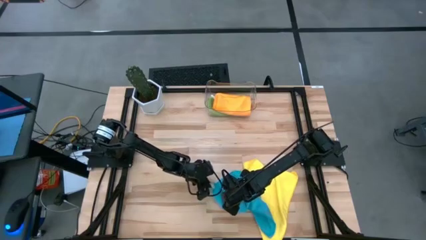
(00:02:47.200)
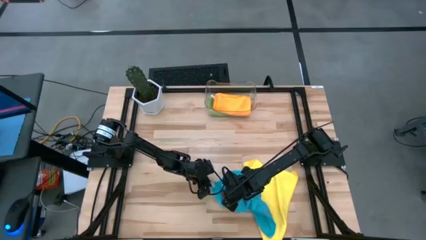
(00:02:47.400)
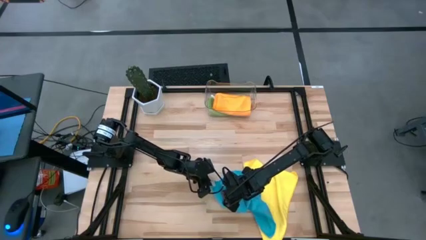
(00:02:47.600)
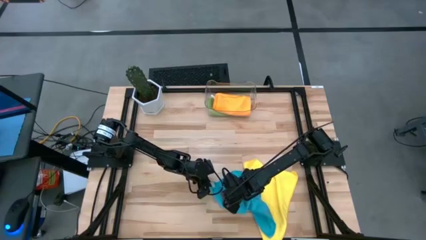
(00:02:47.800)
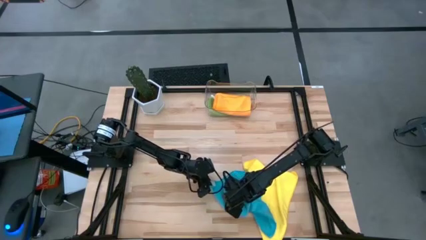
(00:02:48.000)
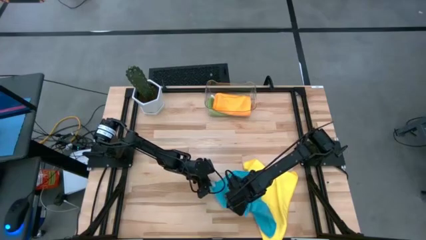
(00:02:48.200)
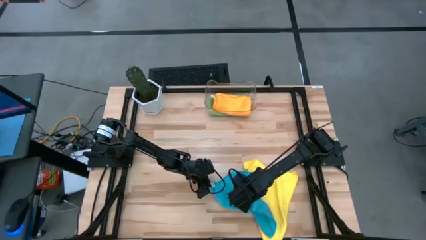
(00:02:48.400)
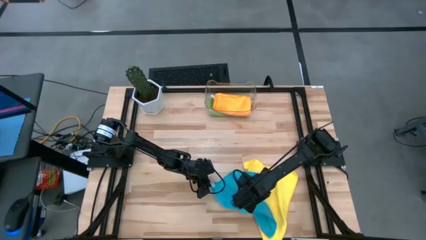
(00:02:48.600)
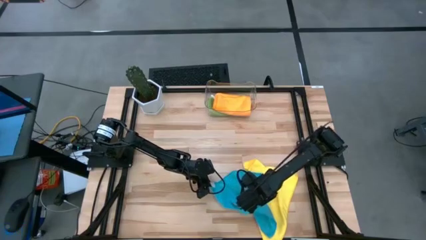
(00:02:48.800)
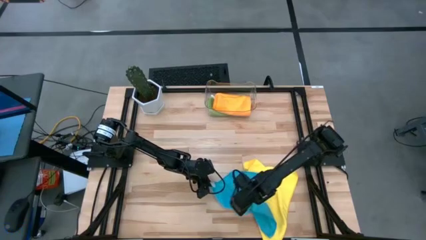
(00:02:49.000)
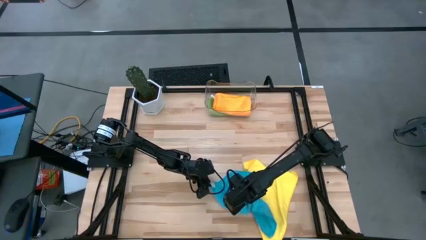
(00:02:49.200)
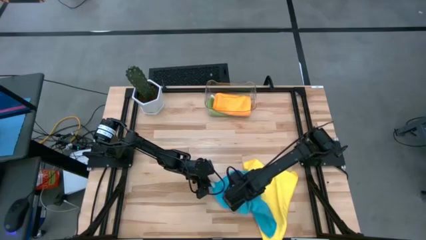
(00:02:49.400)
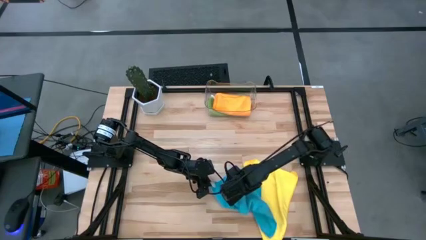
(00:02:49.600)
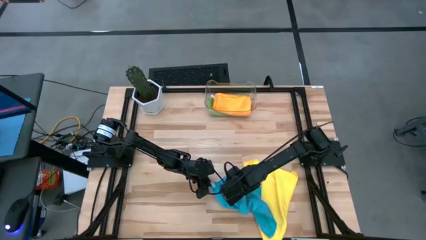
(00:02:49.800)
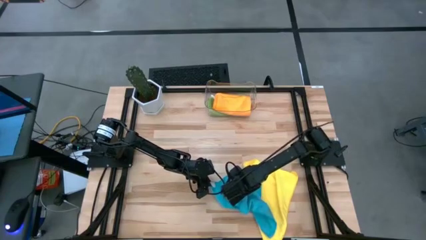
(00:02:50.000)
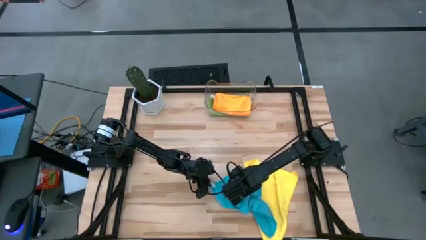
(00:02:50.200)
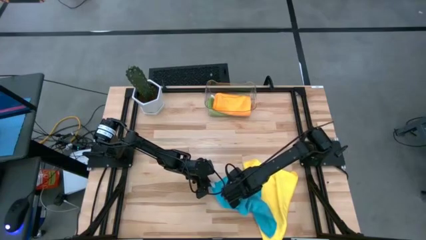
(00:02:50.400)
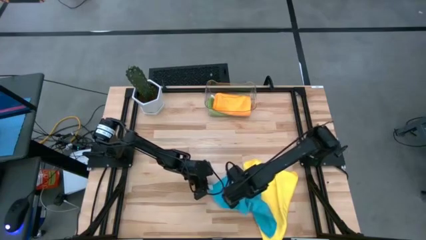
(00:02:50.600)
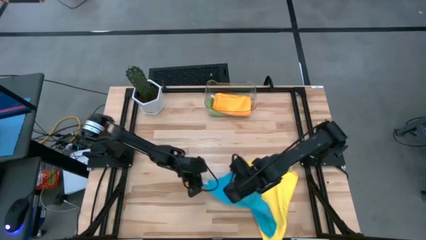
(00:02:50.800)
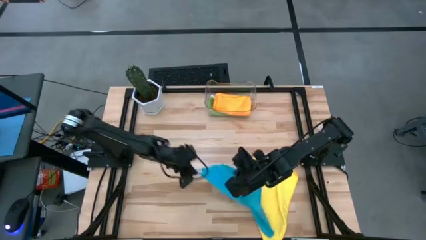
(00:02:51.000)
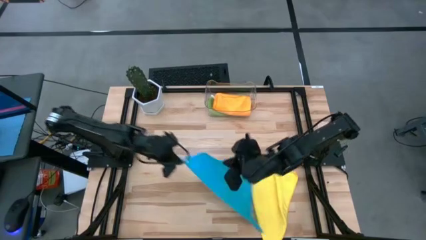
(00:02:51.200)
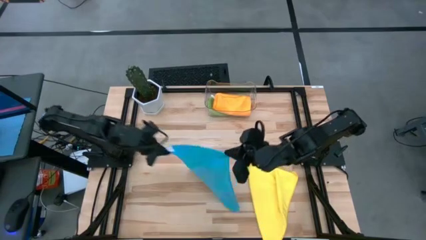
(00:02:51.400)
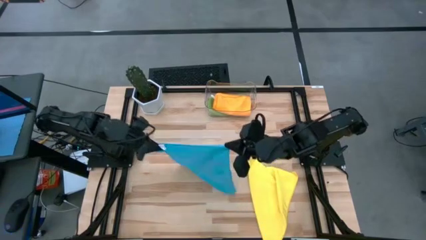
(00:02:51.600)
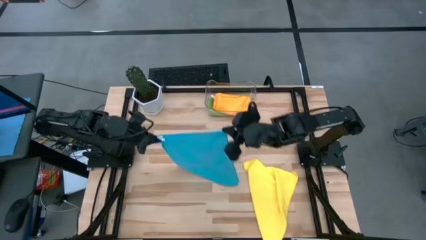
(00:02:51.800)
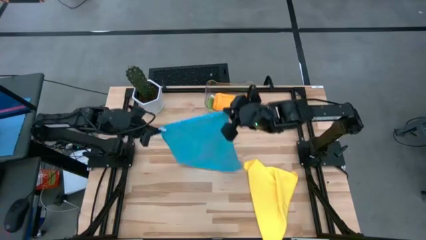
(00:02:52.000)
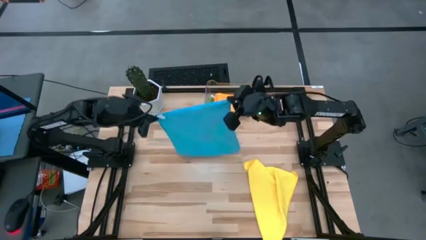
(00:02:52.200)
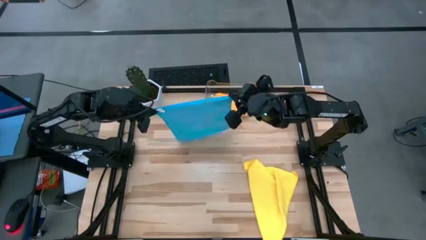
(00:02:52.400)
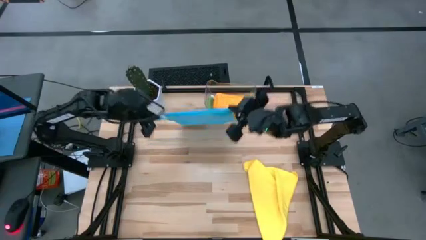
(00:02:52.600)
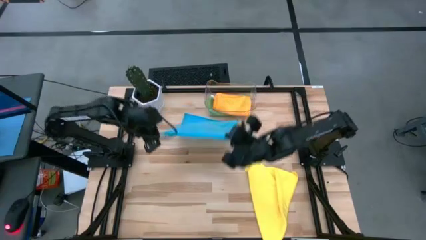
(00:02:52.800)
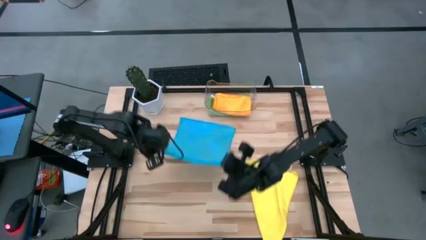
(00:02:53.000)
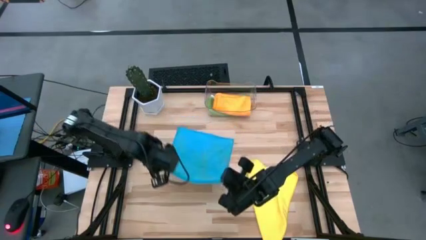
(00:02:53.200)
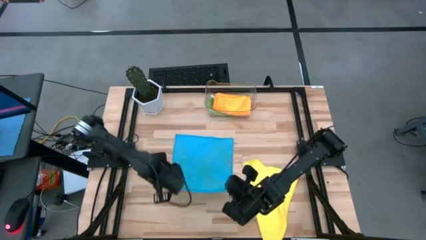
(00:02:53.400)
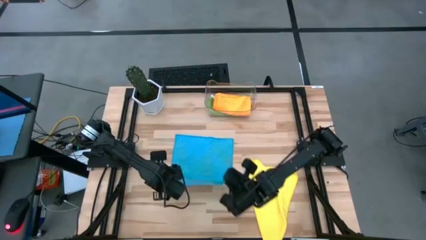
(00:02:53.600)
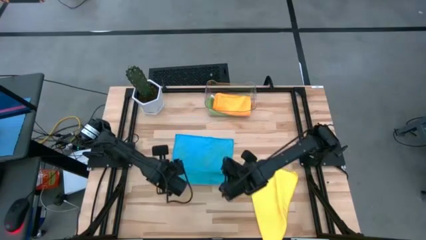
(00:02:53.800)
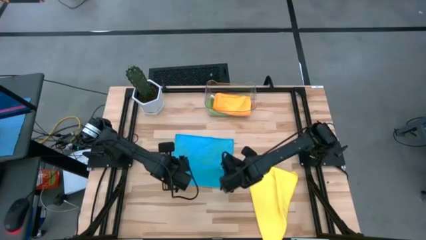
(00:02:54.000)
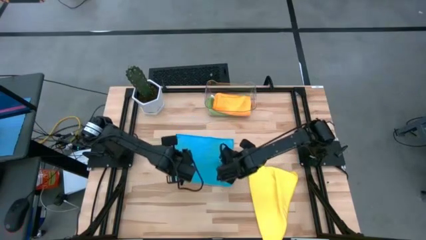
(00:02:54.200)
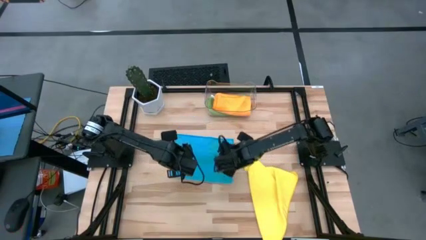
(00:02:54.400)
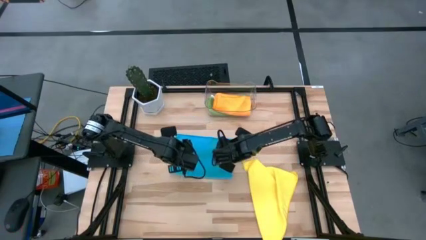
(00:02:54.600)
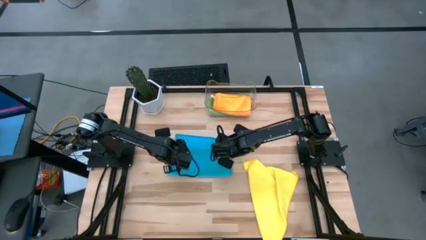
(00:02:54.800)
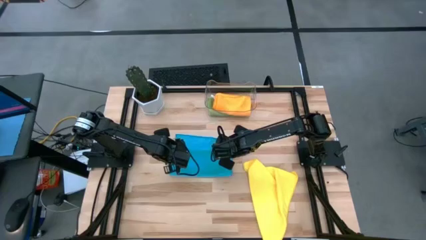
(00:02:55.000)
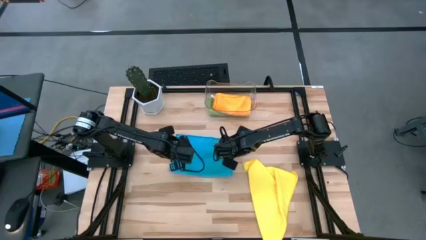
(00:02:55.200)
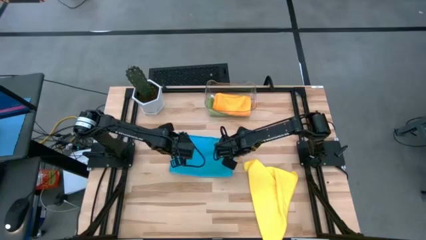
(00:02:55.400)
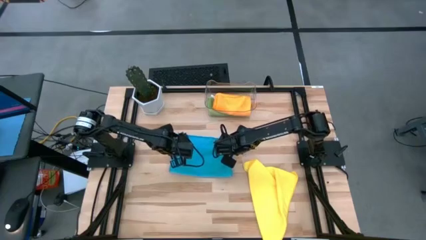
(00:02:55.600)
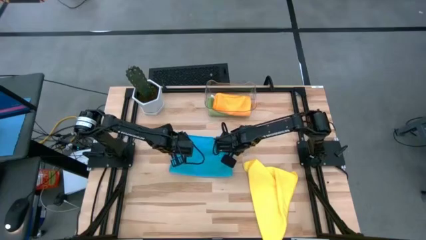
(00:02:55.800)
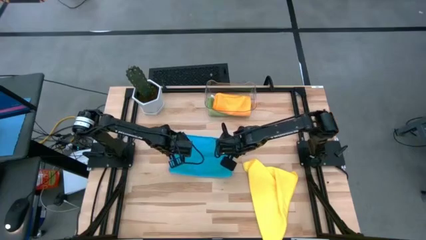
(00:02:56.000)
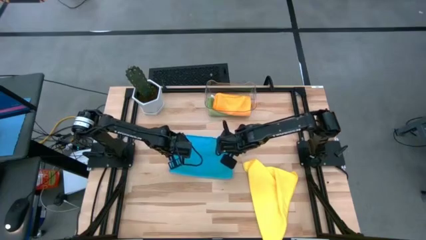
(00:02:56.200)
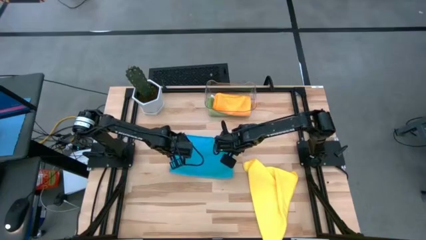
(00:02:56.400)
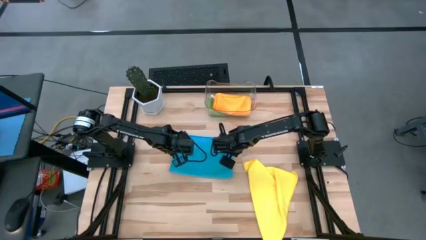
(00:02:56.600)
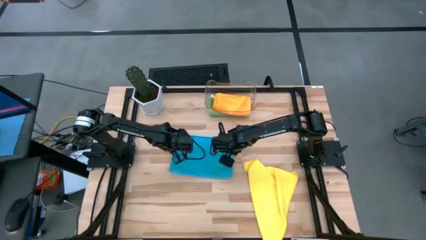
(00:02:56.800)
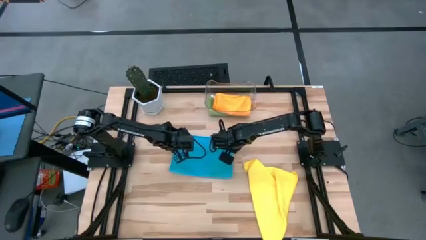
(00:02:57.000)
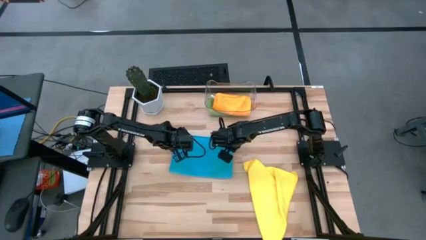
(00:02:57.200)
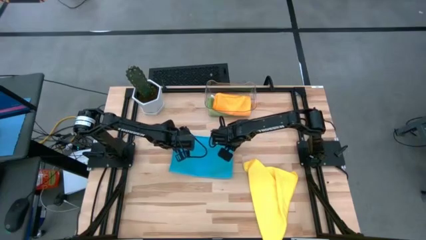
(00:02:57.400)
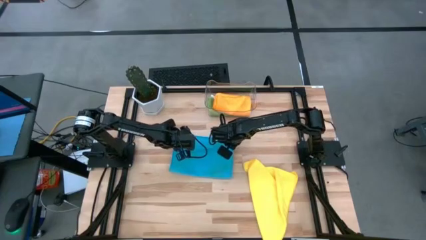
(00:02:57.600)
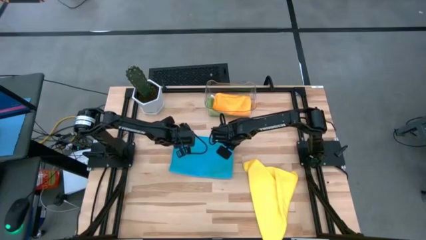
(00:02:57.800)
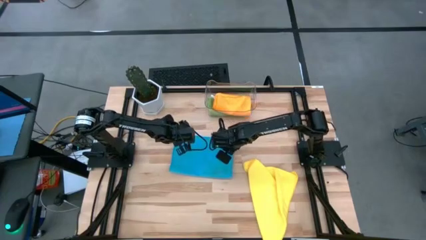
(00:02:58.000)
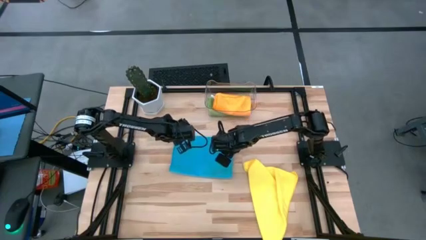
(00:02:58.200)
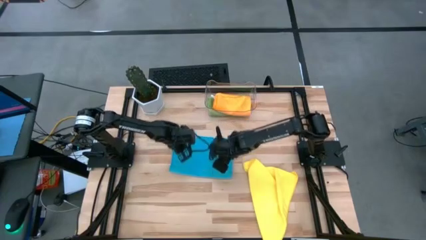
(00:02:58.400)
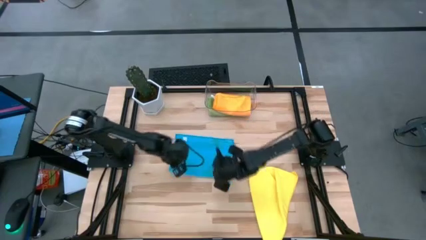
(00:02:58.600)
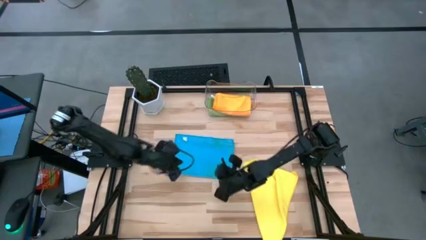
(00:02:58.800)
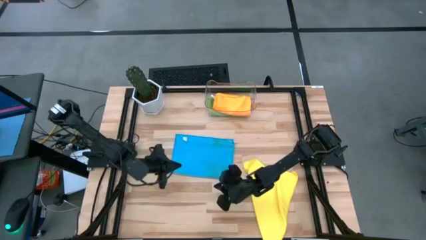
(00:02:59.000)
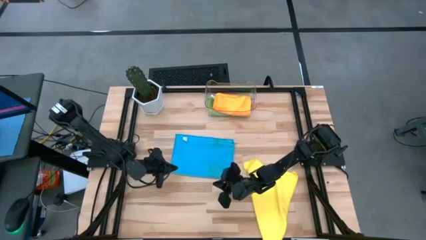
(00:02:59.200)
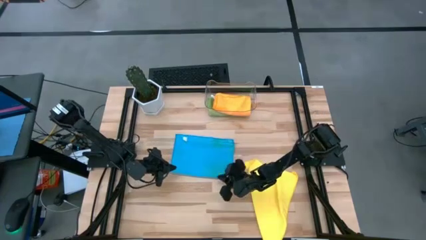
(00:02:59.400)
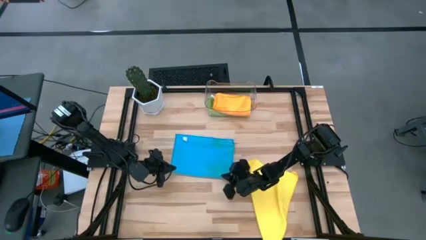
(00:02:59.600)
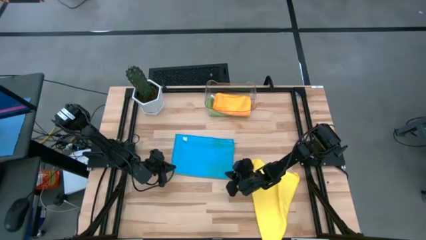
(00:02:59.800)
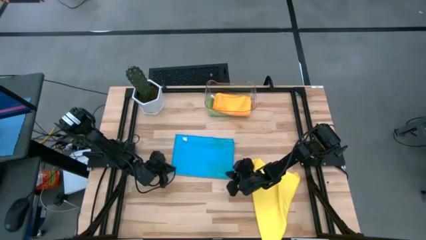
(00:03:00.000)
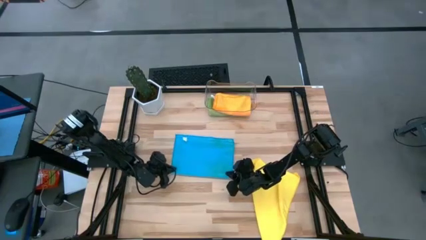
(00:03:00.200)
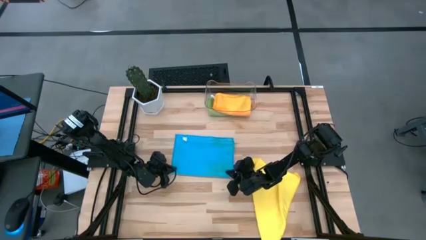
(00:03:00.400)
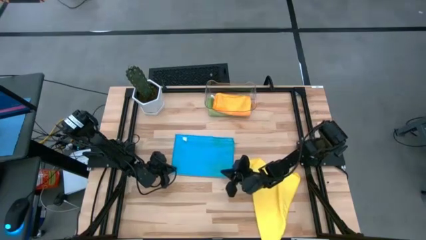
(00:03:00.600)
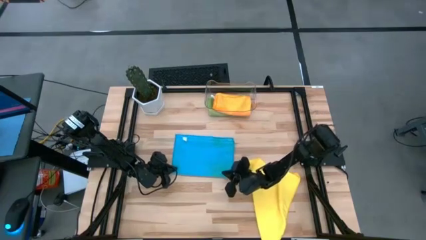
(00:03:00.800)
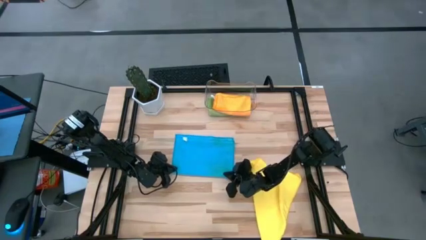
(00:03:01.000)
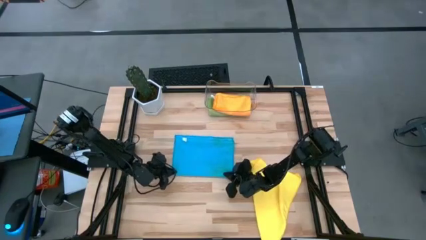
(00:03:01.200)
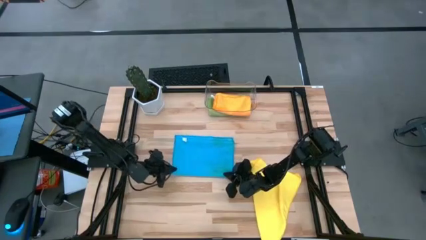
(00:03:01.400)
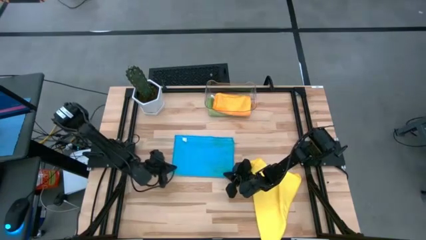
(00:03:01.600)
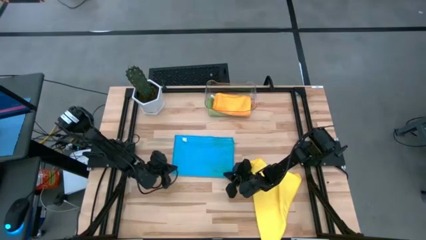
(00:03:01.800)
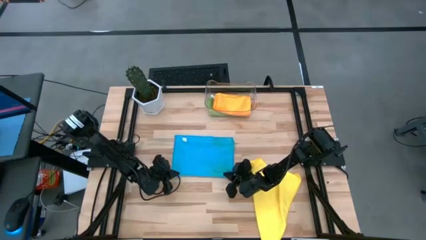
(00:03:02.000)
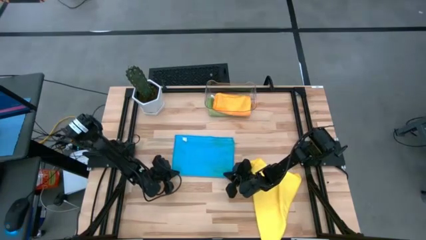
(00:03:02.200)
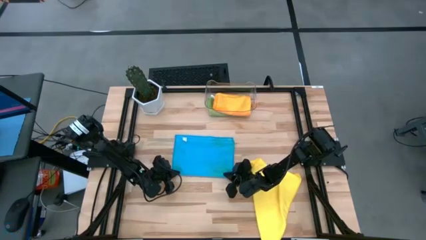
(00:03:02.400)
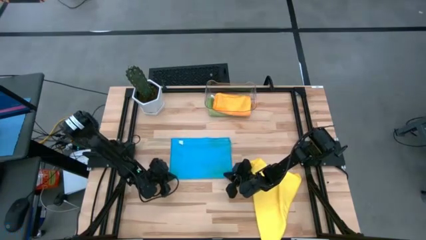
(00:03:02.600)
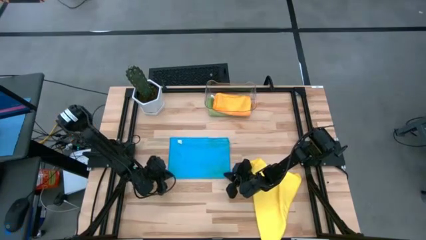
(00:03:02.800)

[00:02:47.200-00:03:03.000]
Task: Fold microfiber towels
Fold the blue towel
